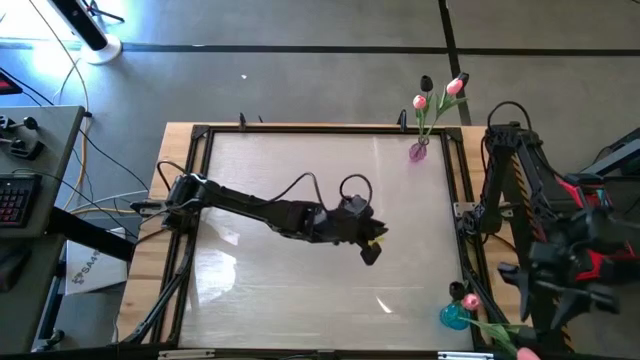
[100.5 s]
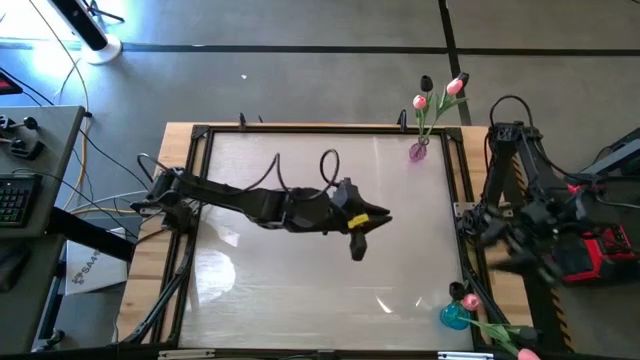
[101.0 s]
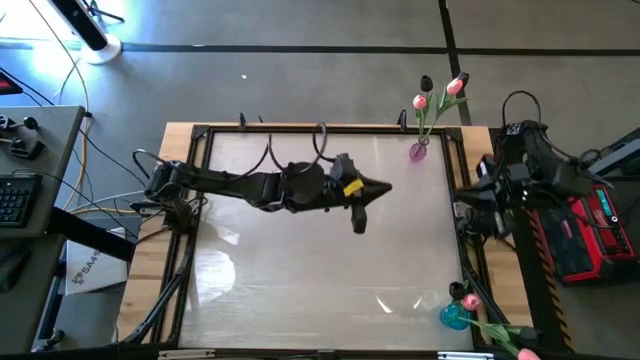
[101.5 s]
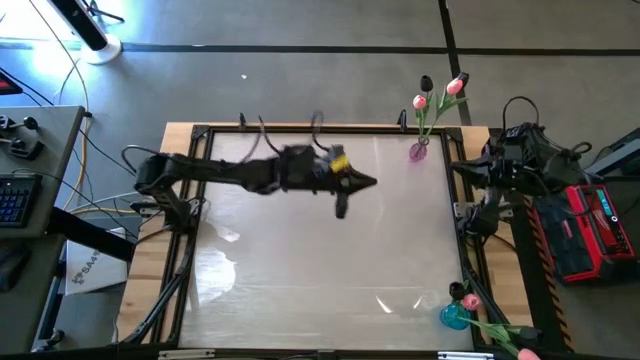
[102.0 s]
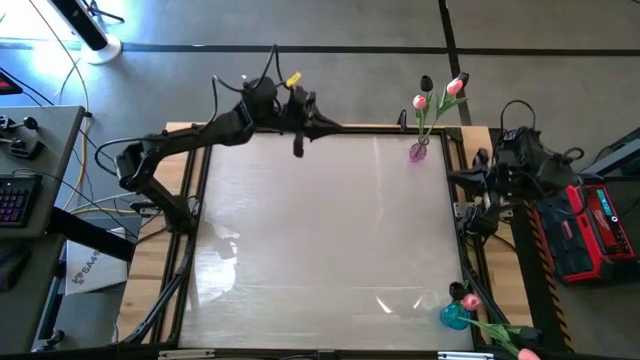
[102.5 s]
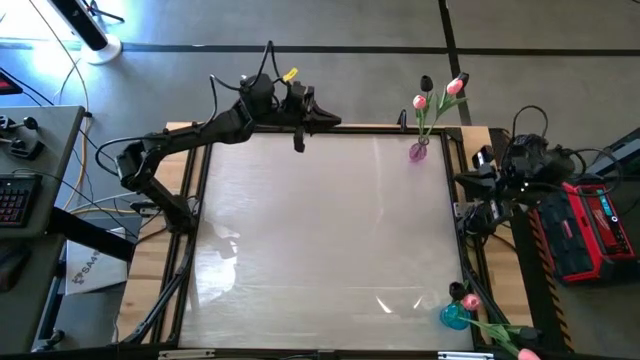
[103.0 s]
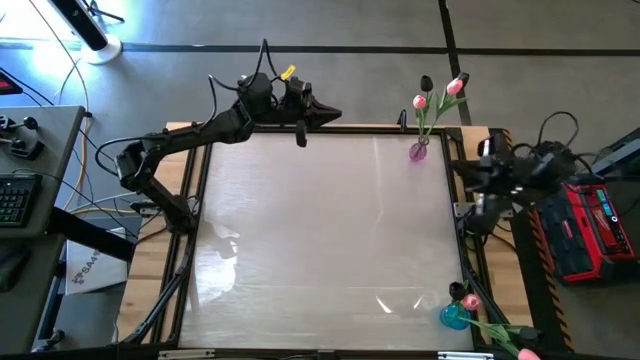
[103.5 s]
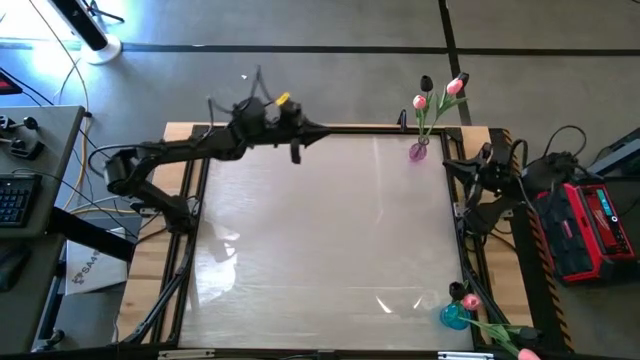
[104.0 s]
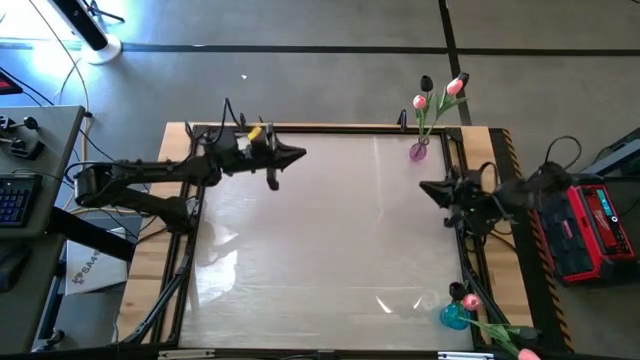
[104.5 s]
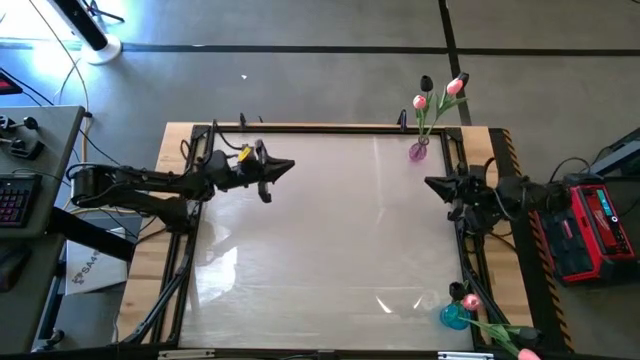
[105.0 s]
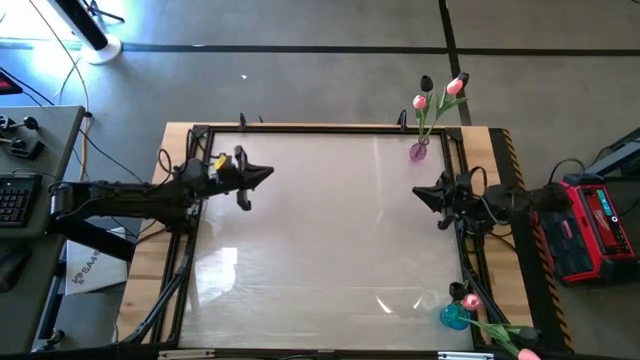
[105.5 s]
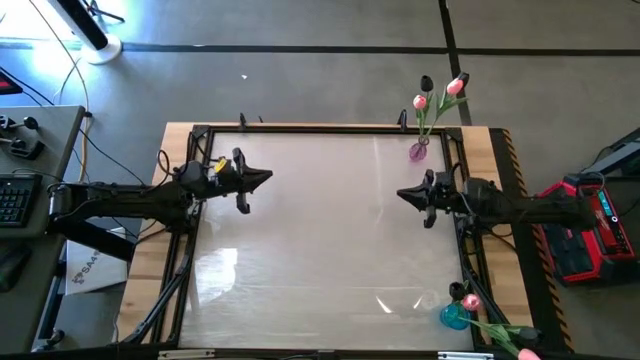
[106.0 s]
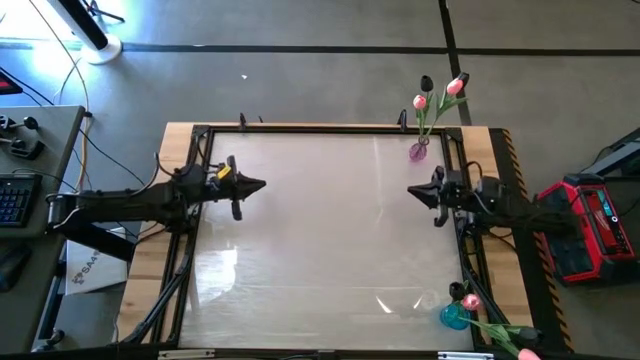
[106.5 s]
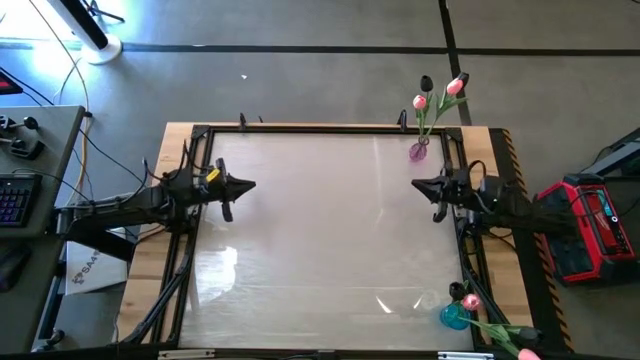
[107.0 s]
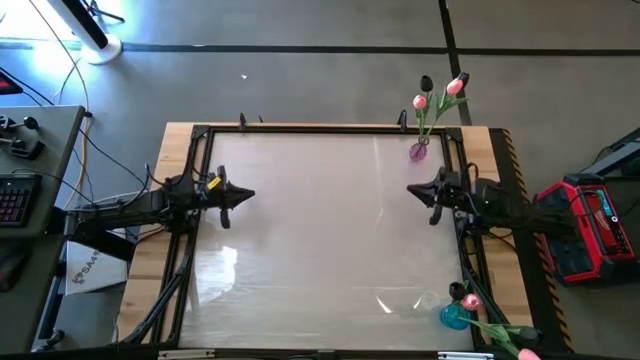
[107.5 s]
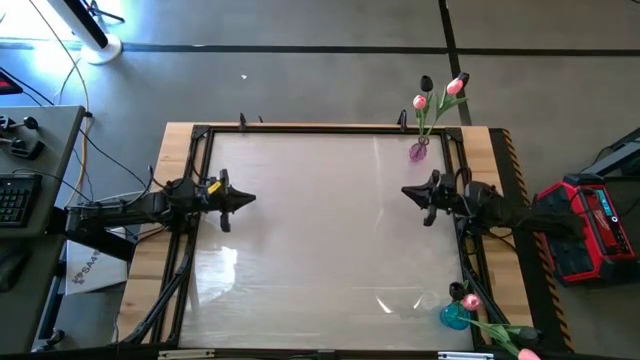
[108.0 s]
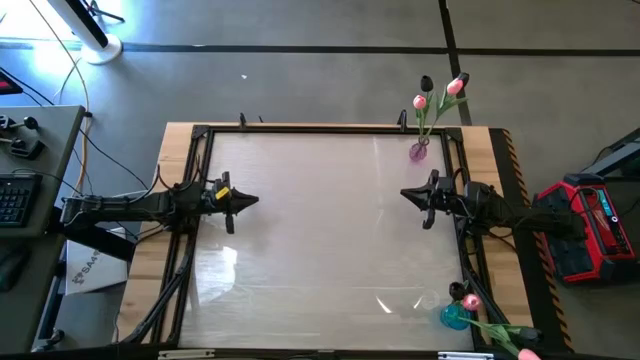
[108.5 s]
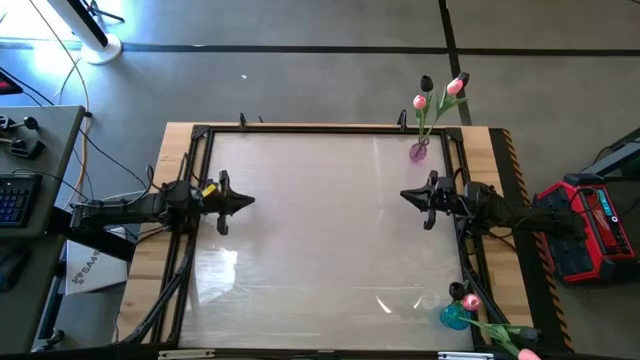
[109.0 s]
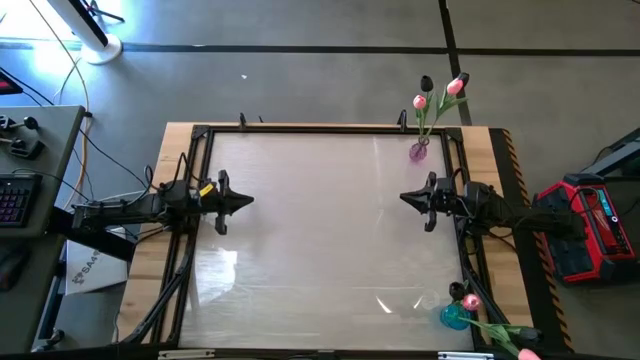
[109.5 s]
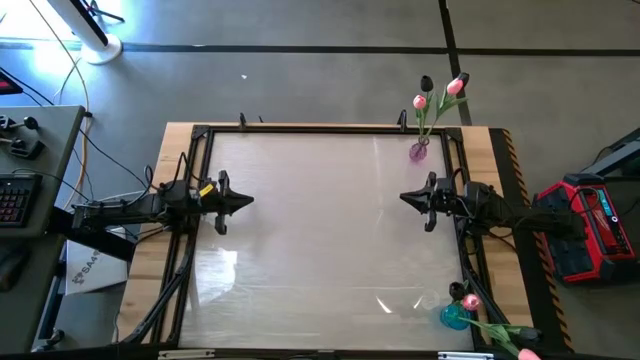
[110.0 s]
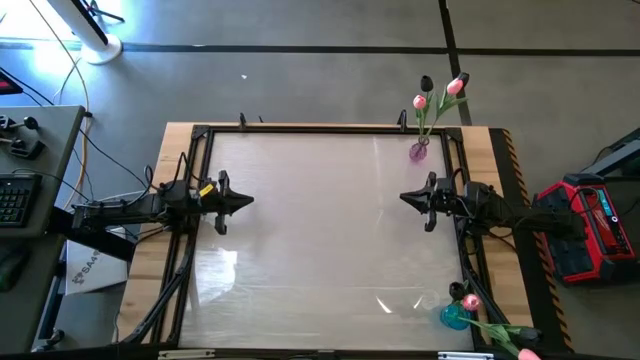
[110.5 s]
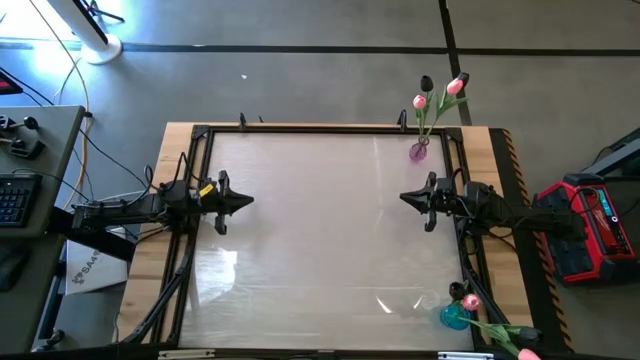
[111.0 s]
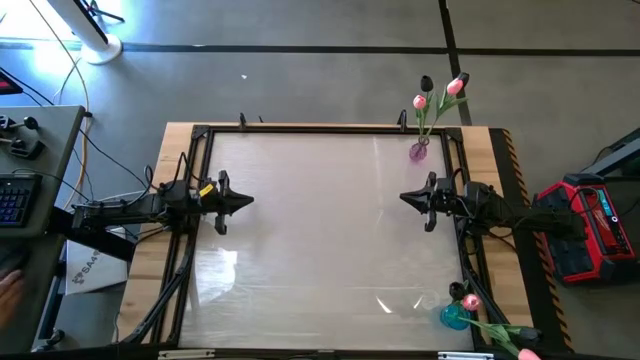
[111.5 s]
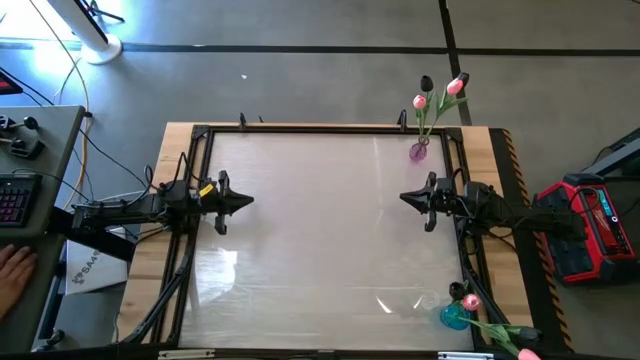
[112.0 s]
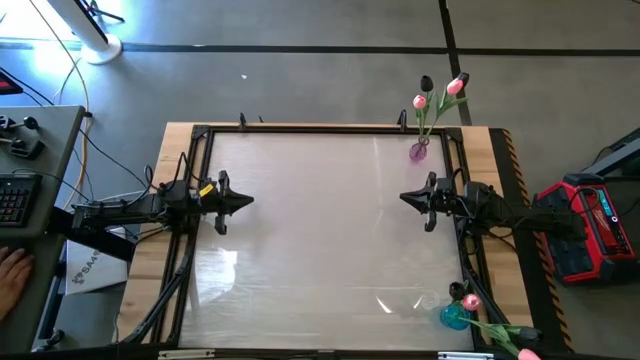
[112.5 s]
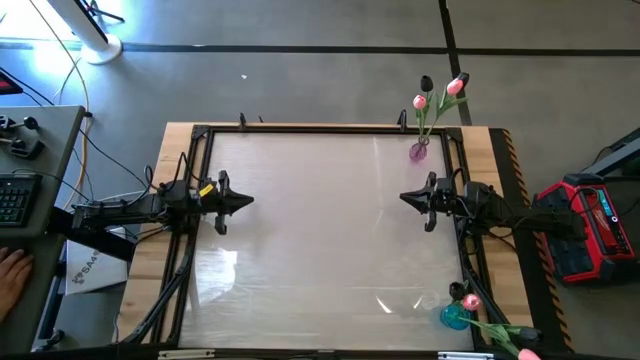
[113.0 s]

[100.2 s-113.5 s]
Task: Sort flowers into vase by color
Return to Home Position

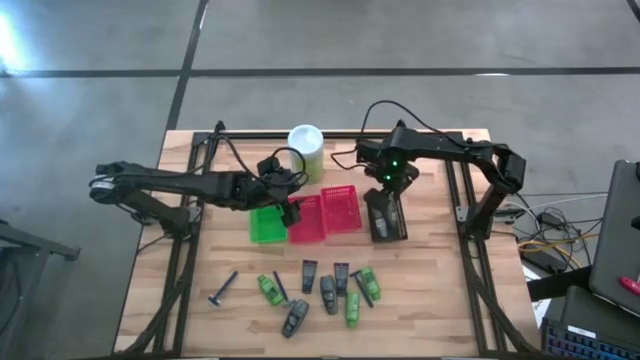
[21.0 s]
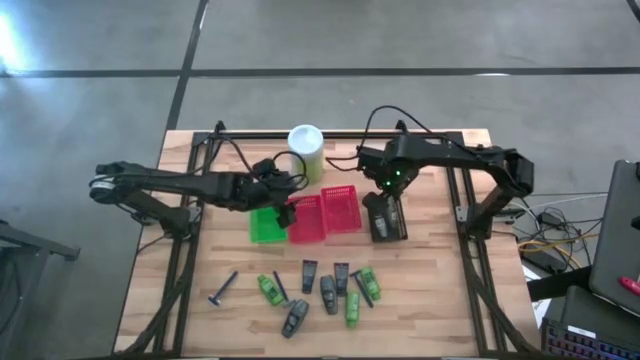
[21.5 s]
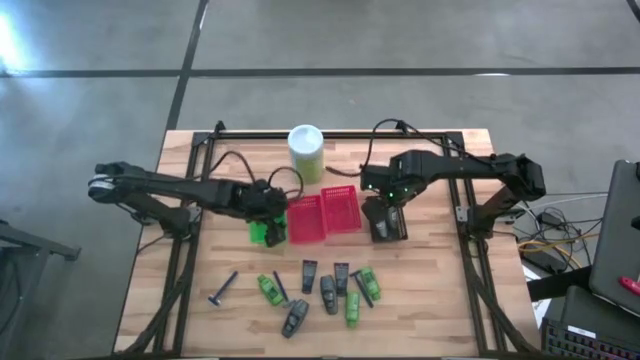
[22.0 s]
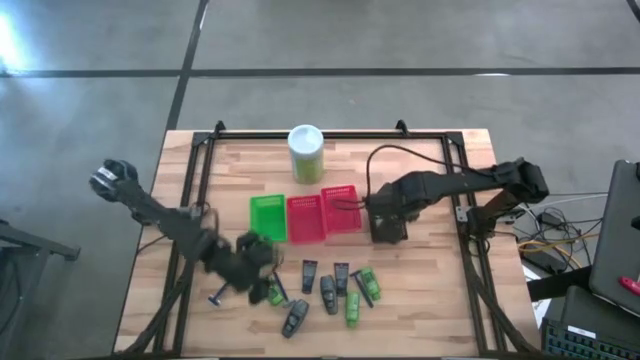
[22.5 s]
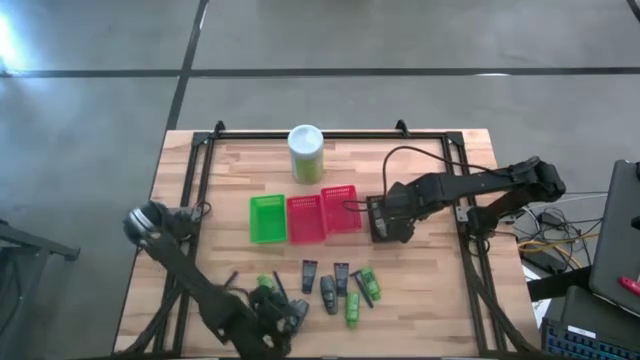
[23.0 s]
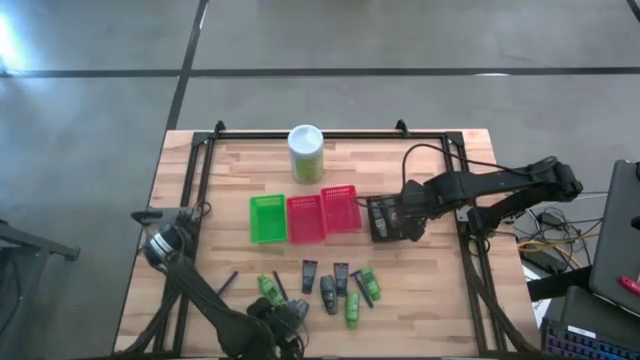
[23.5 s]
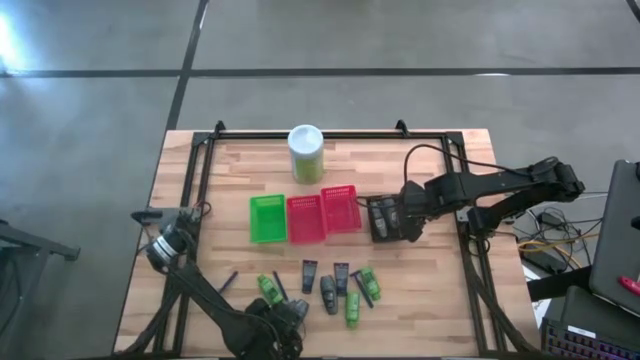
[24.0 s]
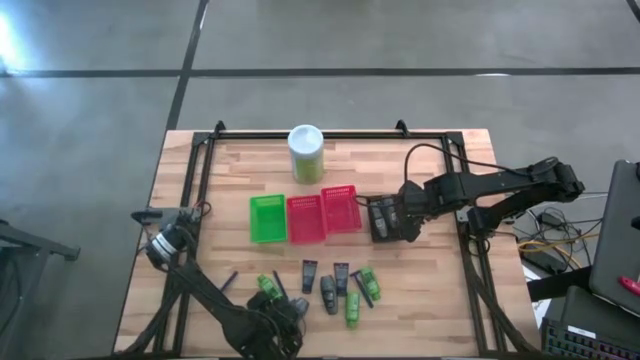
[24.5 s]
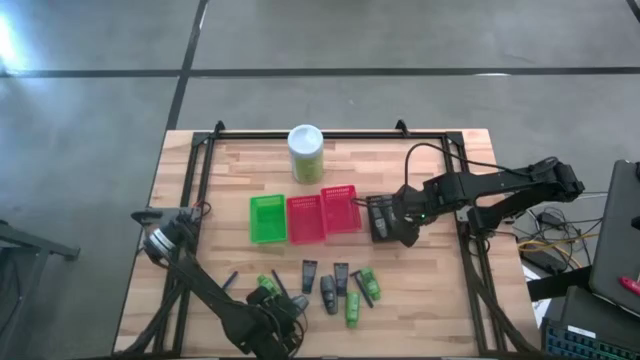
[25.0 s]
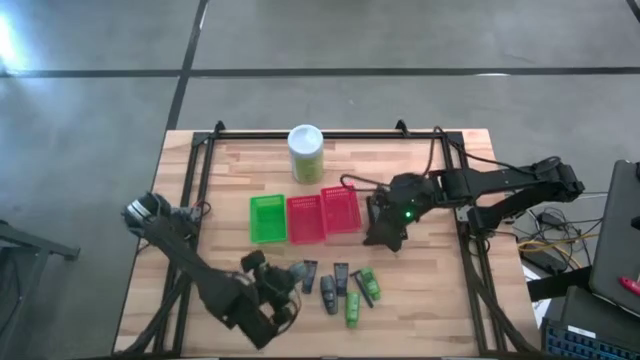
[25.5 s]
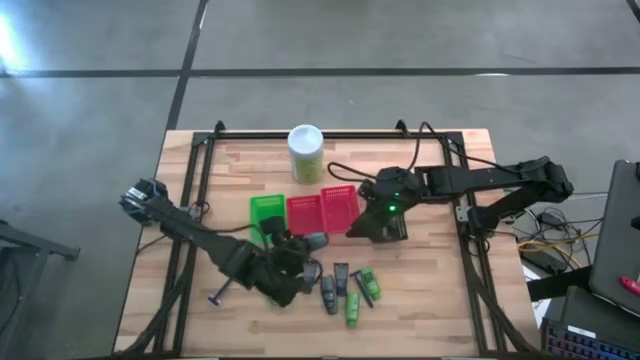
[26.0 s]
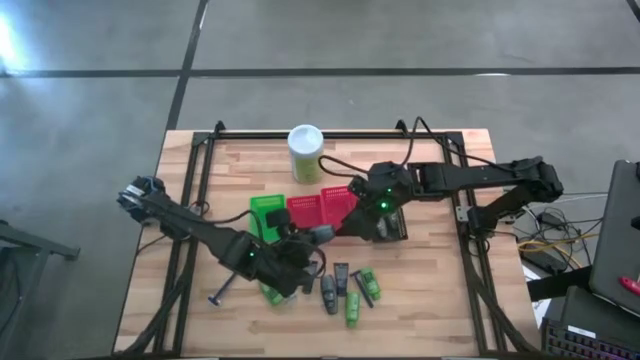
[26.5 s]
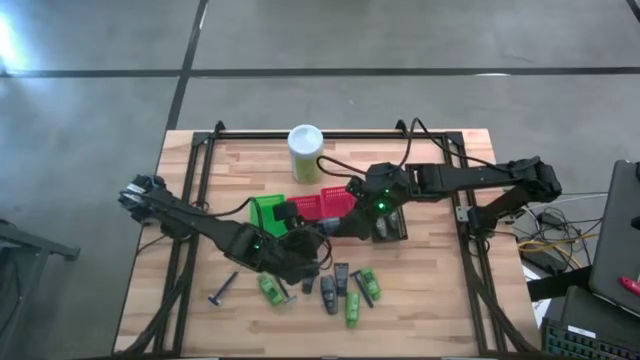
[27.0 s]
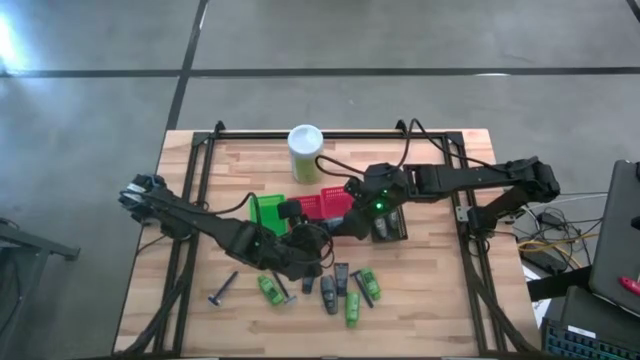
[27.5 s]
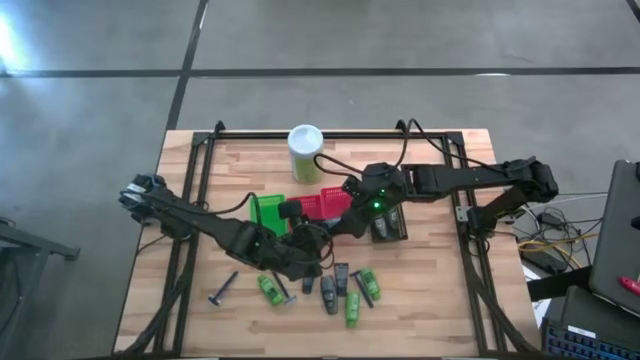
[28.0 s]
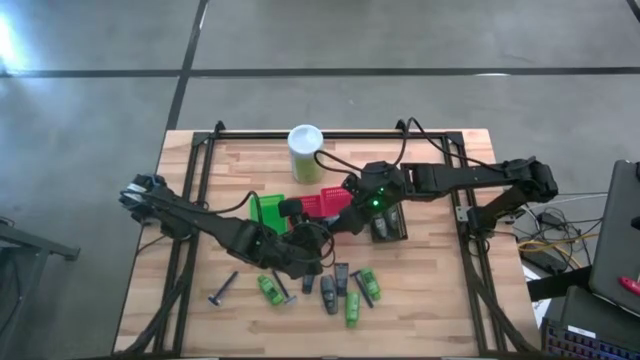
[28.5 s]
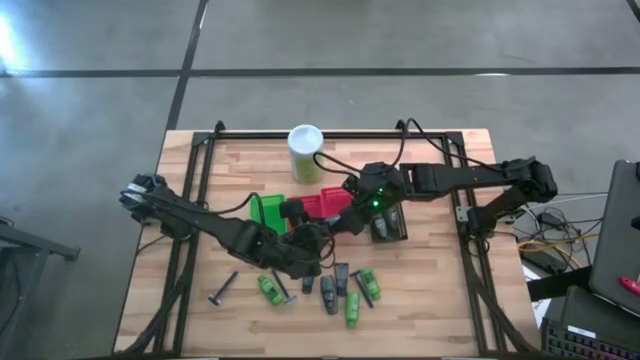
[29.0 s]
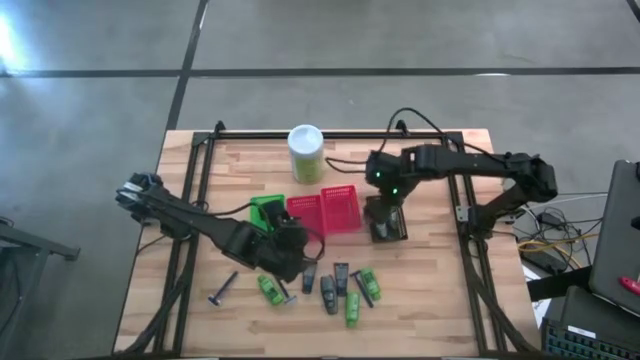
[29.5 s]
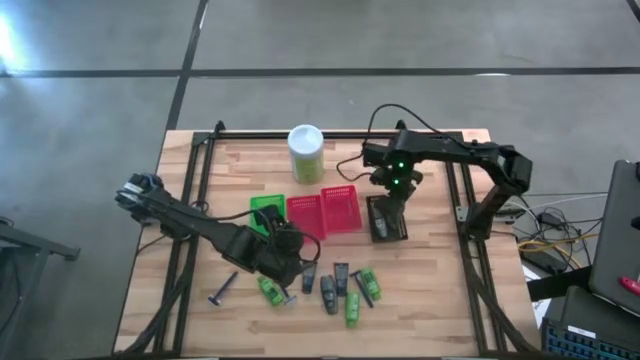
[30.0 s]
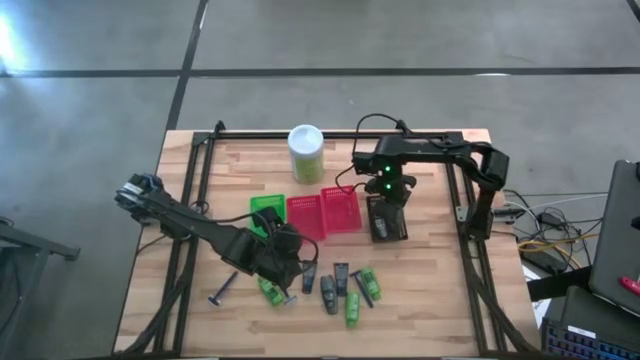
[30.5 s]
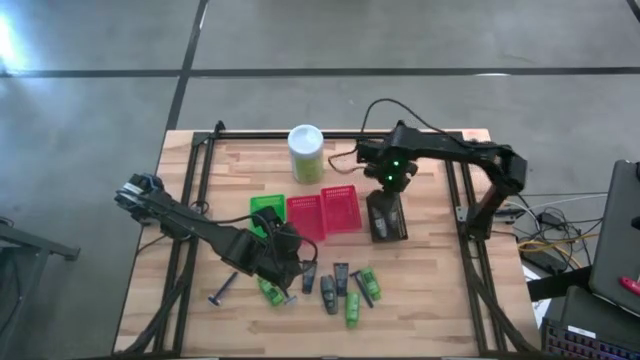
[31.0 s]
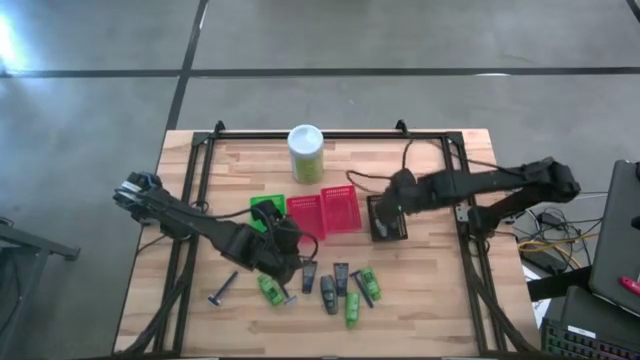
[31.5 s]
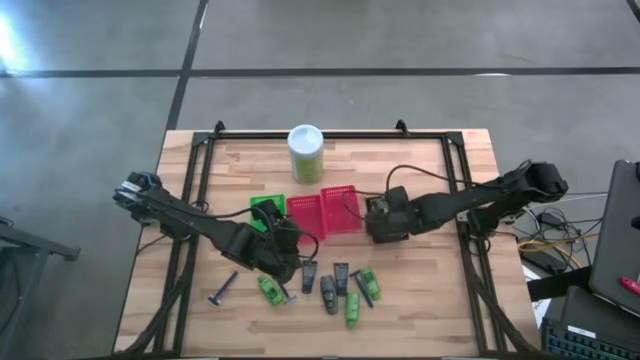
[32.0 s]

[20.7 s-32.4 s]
Task: Pick & Place Travel size toiletries
Put the black deodorant into the black bin
